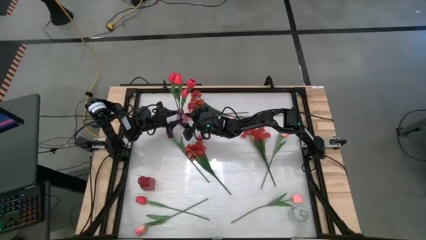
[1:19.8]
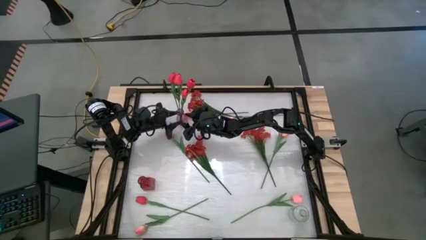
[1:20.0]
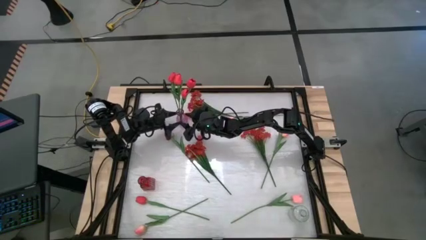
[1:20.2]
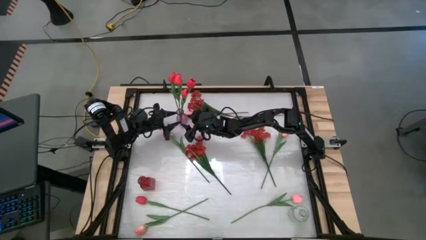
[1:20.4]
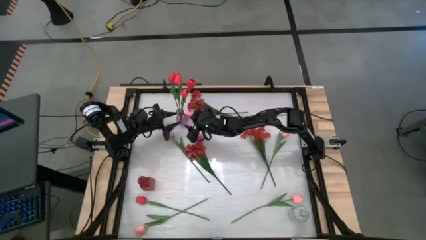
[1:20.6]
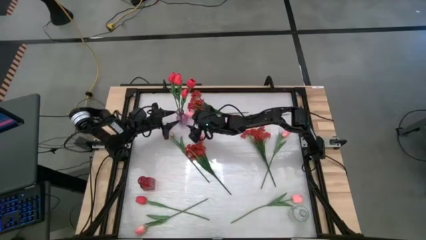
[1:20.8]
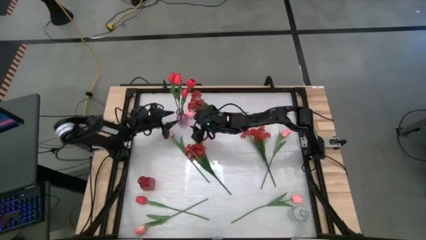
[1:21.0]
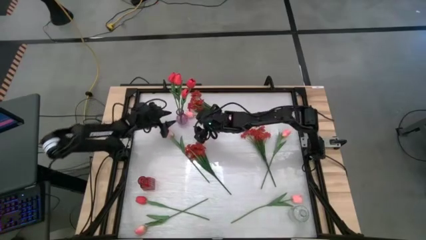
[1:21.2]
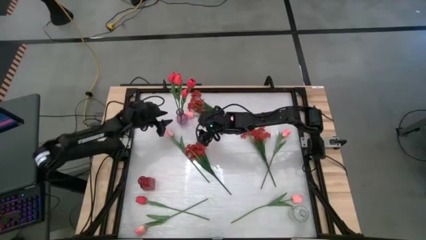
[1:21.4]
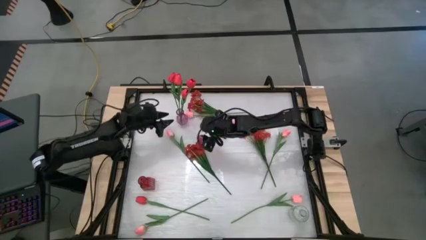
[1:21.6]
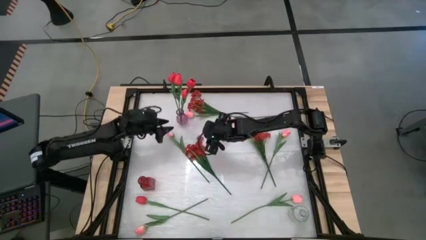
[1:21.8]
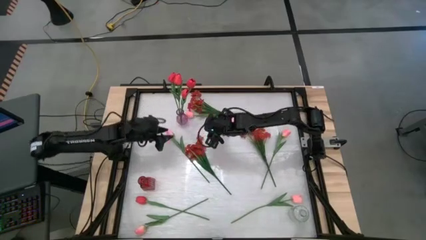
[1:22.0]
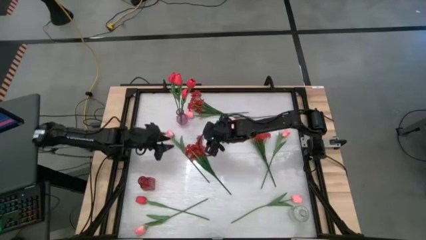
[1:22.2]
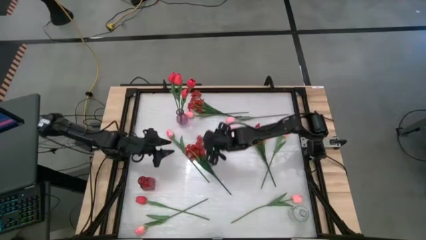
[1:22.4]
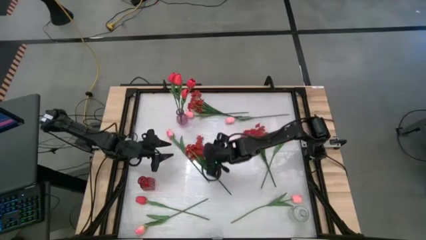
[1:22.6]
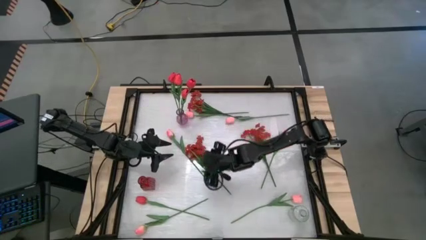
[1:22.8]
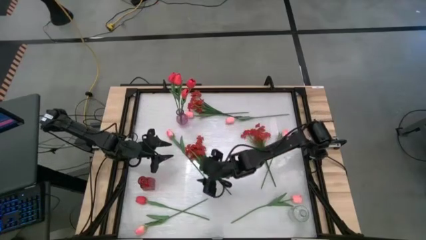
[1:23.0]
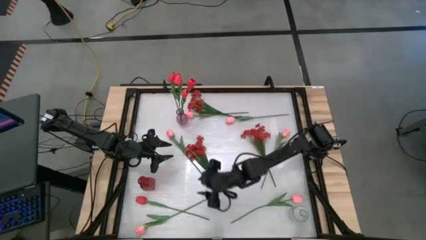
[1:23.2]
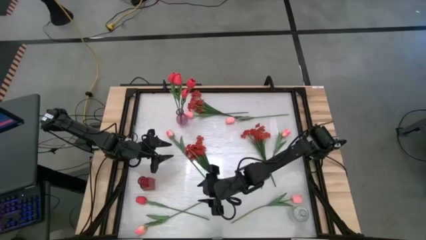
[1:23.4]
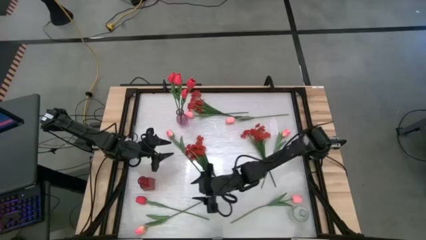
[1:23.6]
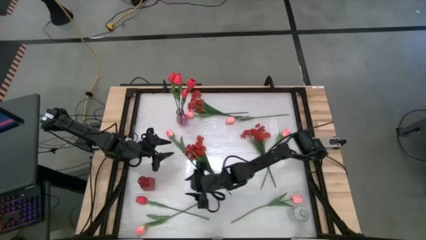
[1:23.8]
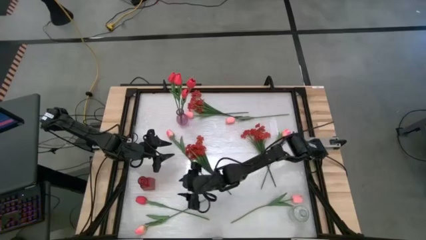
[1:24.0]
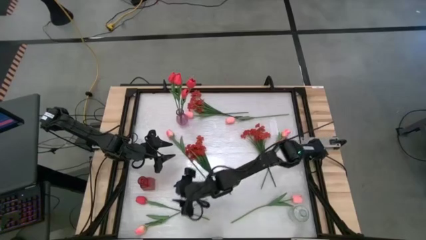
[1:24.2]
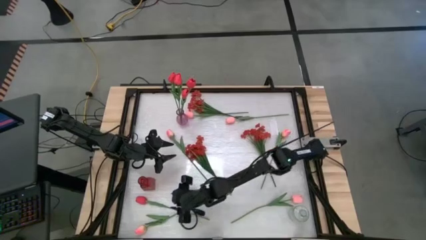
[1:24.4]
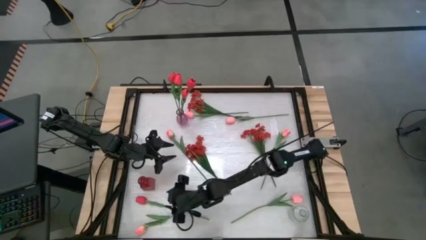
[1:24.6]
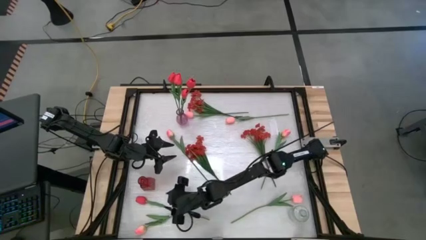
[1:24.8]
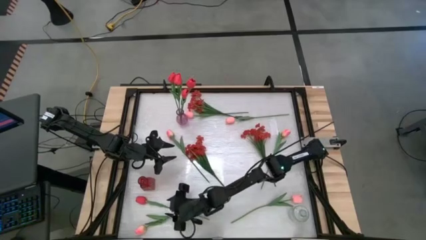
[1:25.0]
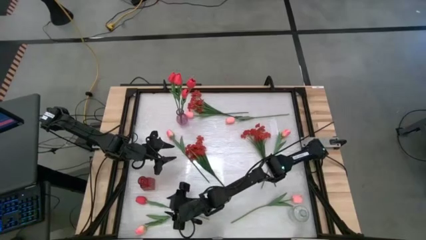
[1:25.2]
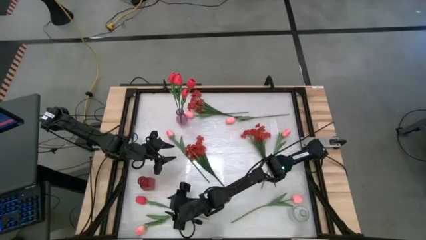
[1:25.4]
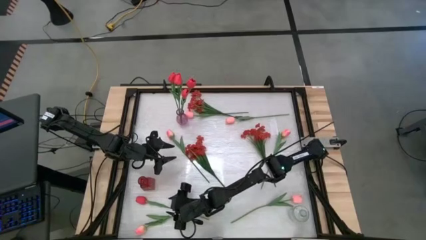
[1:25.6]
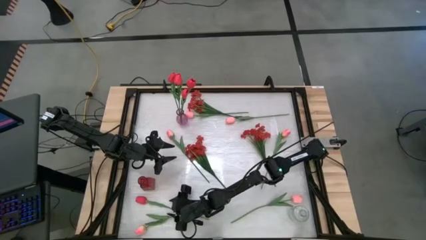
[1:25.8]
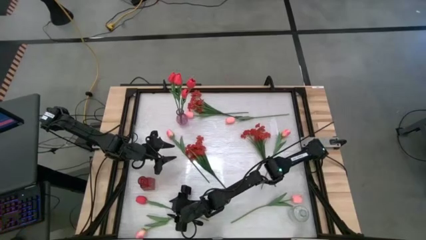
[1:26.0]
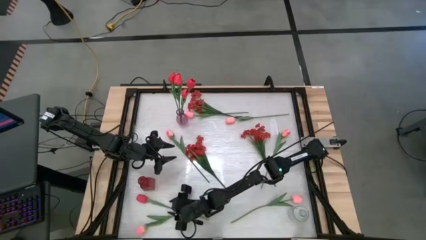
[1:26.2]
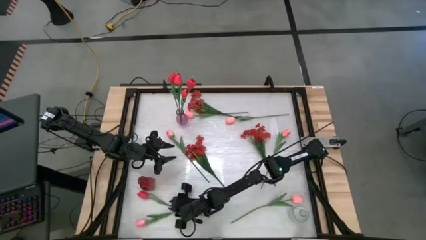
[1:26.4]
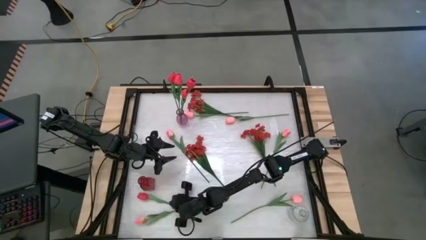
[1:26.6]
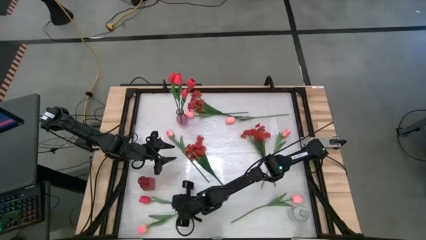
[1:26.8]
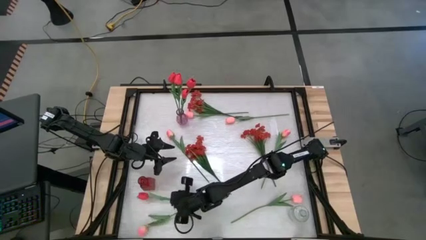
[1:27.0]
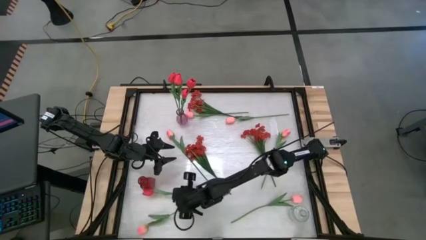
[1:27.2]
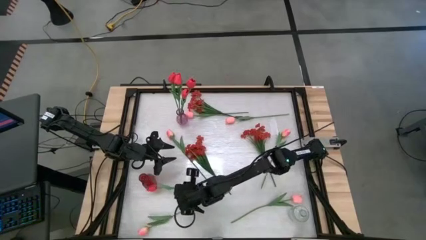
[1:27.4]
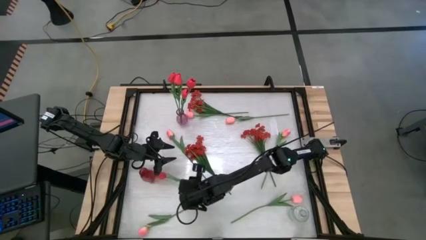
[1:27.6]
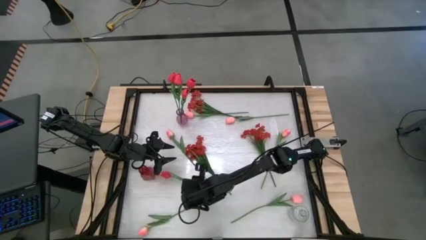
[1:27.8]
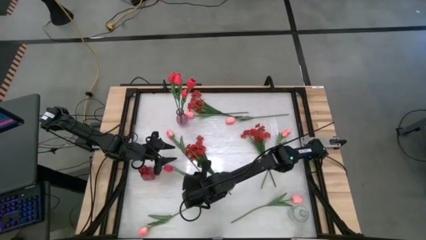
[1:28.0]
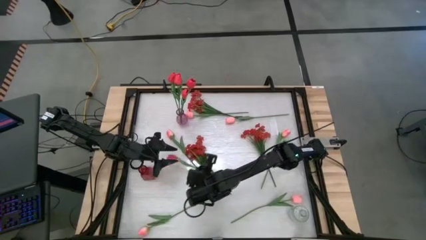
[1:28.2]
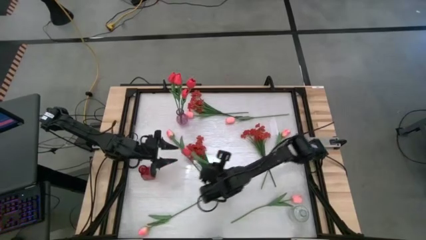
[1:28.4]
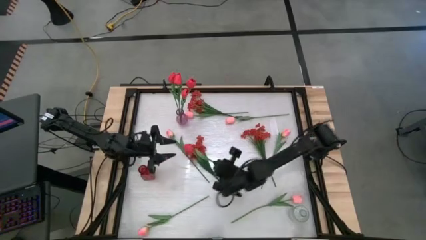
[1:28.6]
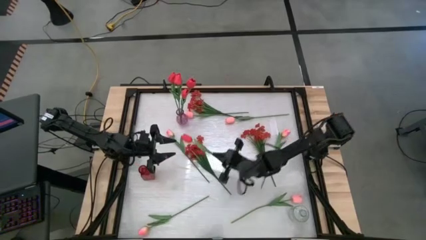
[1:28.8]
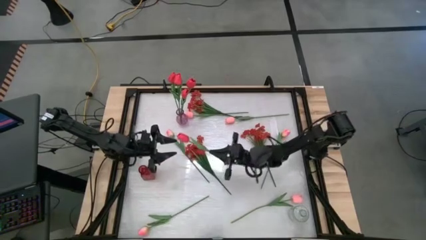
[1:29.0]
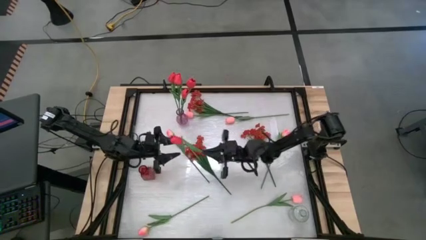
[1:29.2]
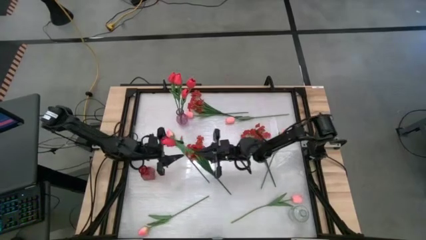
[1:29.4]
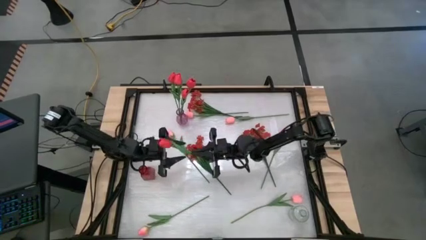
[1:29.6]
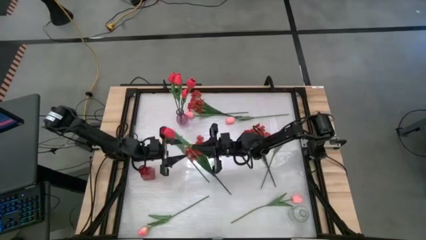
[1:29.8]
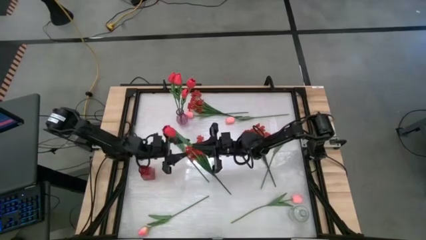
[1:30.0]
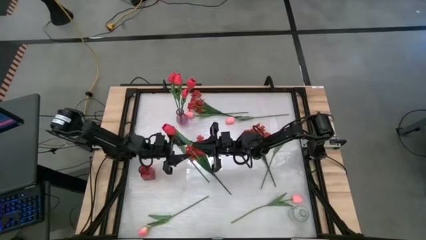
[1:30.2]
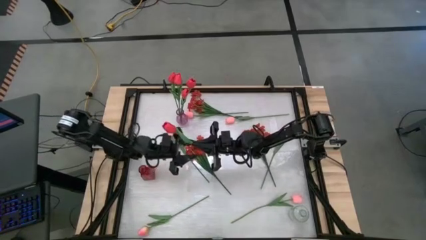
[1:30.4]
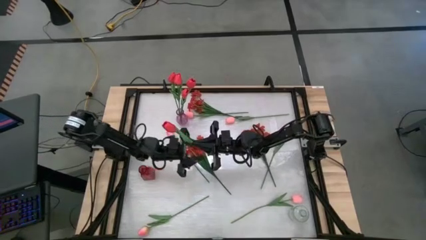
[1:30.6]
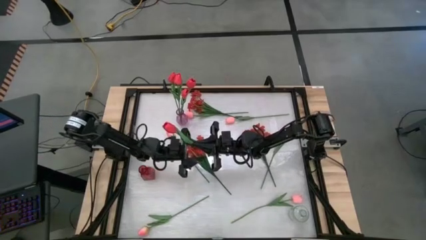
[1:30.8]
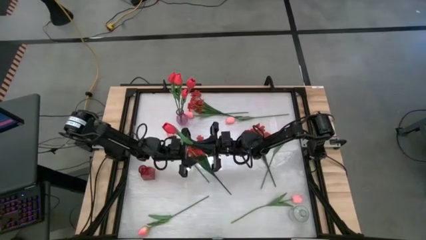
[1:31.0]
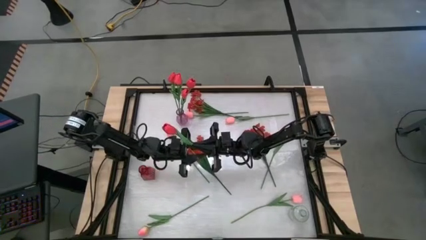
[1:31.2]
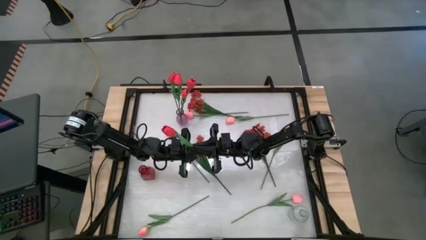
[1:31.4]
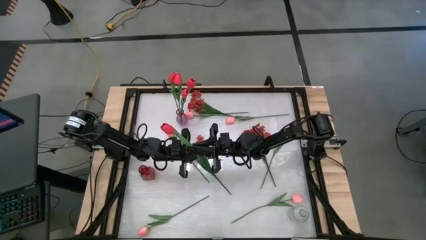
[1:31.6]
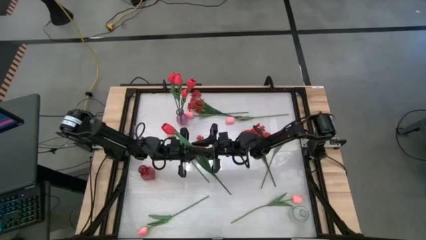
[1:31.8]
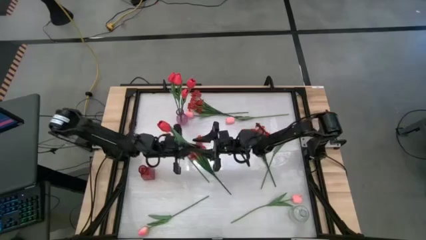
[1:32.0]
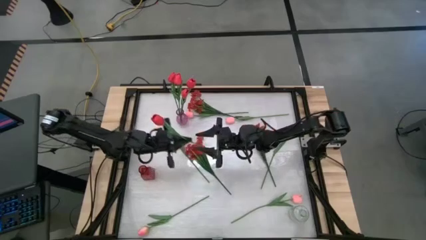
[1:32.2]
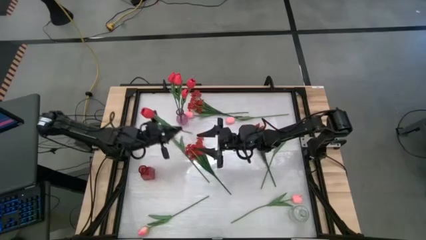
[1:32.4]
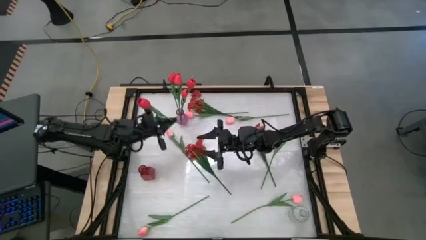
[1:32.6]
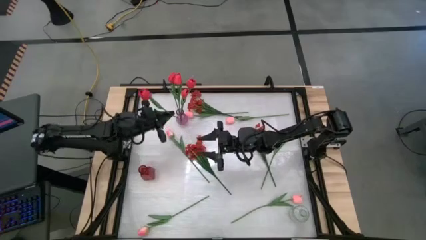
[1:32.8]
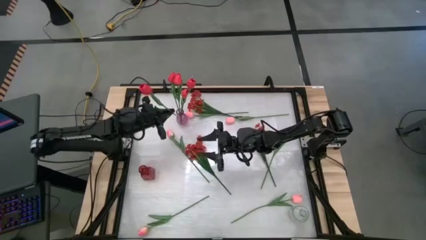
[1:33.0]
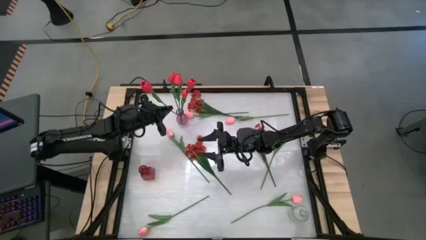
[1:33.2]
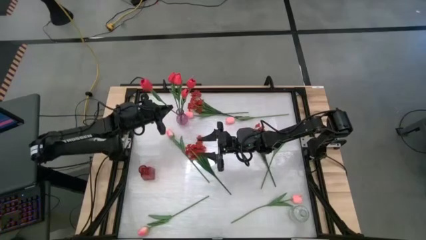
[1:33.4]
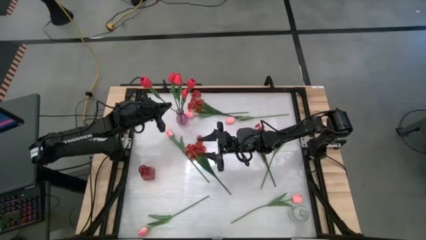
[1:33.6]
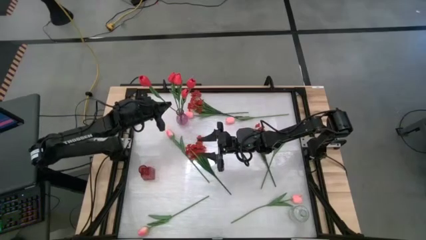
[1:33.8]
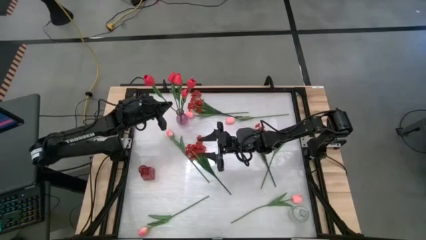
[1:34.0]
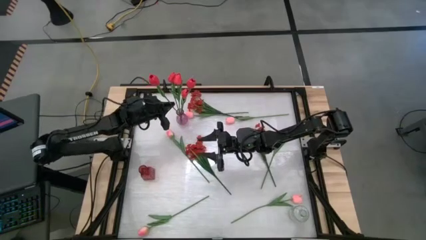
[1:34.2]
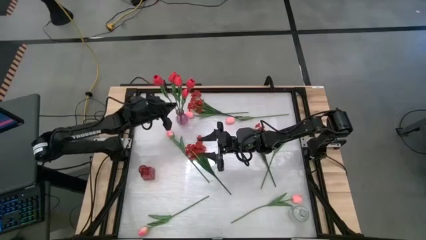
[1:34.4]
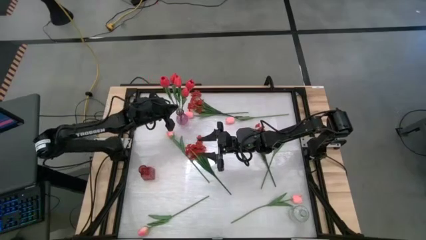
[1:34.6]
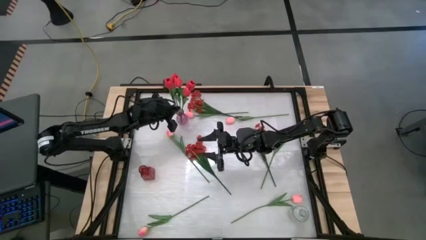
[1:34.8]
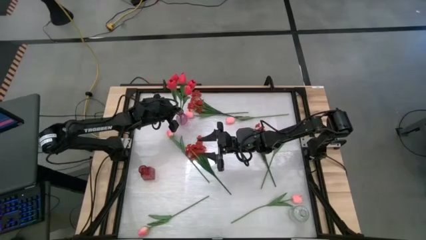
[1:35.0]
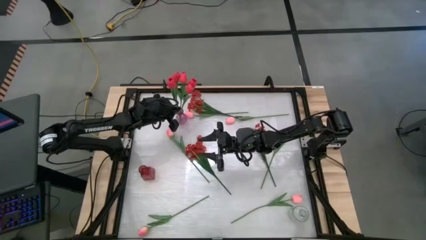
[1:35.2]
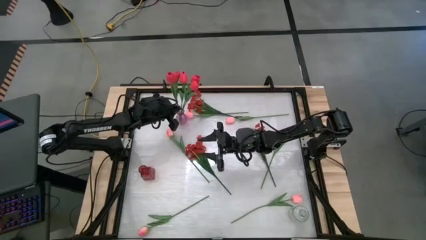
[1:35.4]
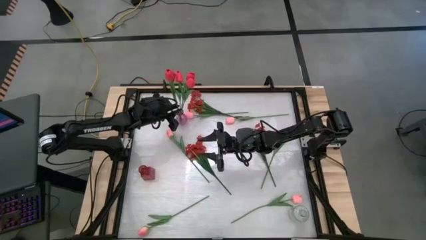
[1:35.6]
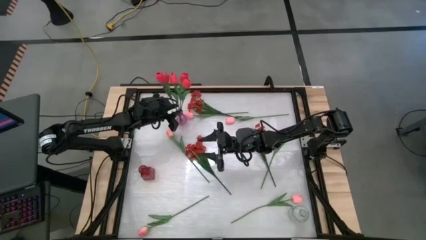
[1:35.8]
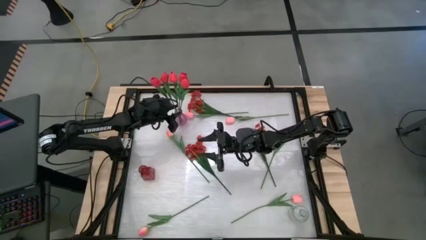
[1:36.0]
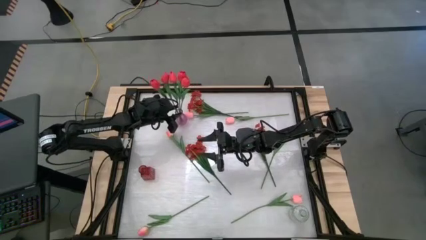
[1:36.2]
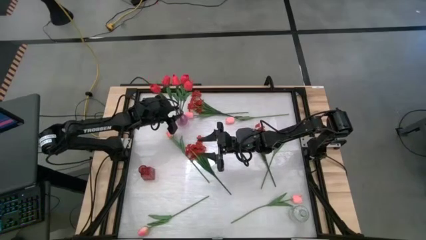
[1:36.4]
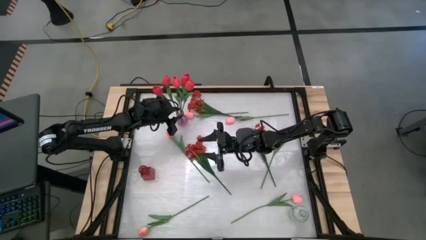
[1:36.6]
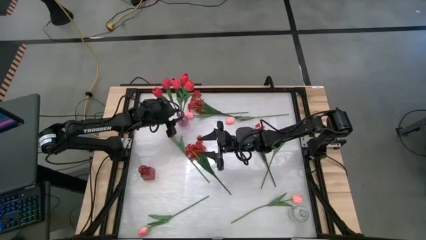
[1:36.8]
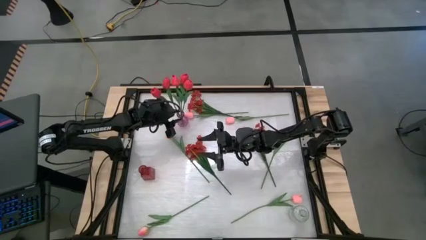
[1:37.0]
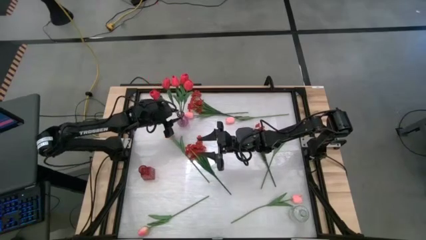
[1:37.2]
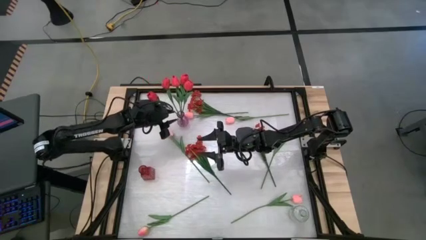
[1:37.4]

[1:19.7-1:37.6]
Task: Sort flowers into vase by color
Put the red tulip into the purple vase
